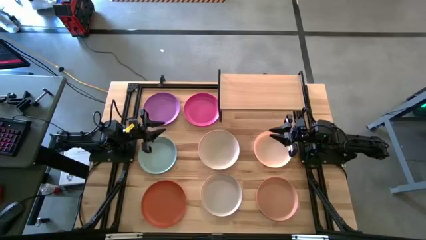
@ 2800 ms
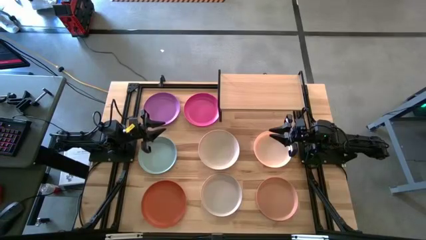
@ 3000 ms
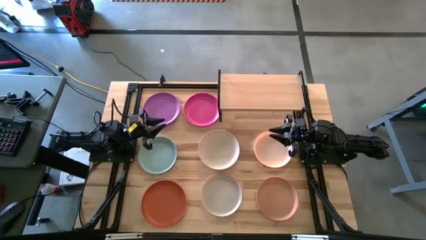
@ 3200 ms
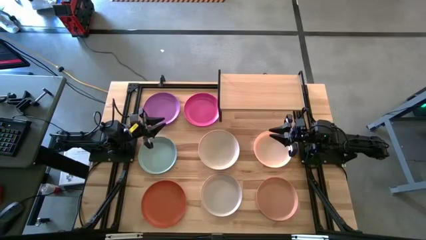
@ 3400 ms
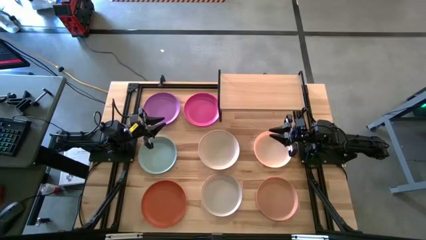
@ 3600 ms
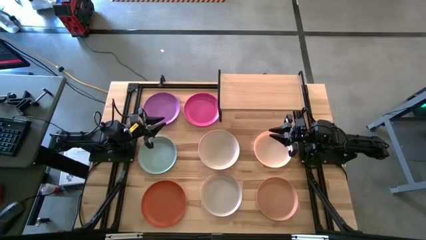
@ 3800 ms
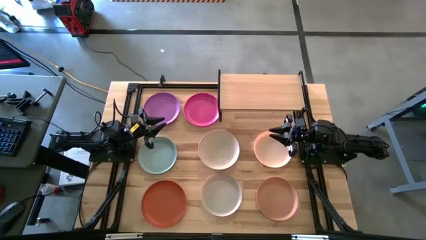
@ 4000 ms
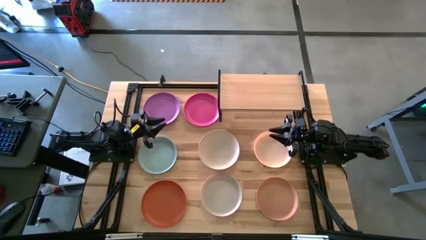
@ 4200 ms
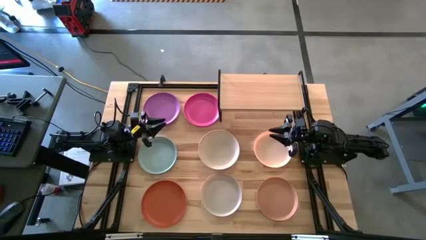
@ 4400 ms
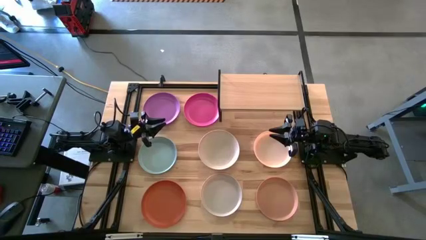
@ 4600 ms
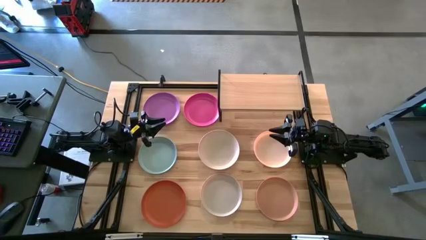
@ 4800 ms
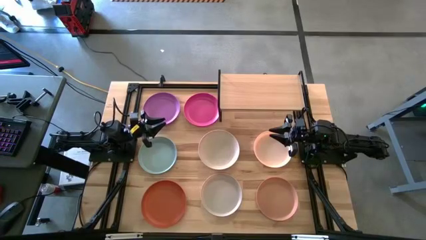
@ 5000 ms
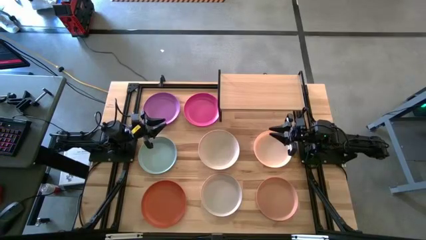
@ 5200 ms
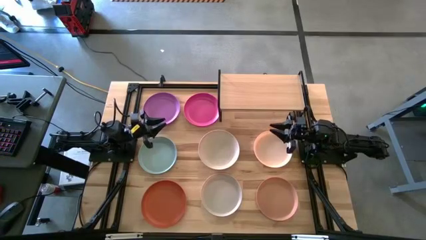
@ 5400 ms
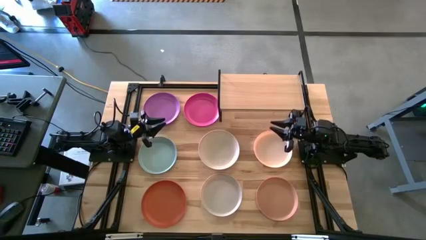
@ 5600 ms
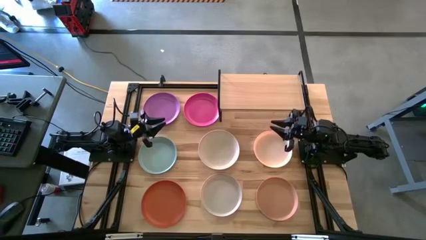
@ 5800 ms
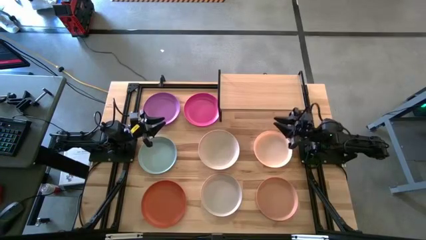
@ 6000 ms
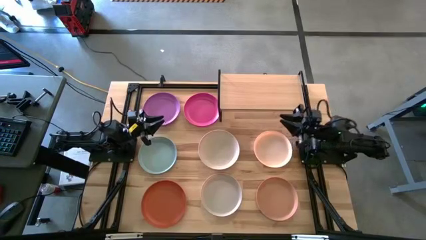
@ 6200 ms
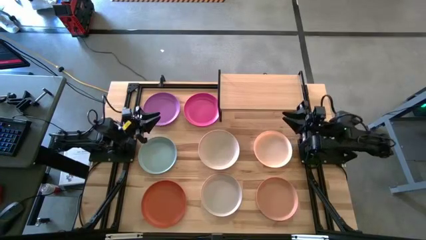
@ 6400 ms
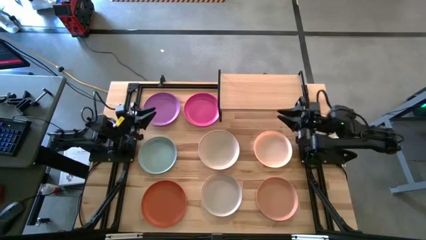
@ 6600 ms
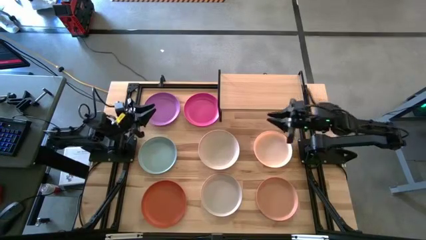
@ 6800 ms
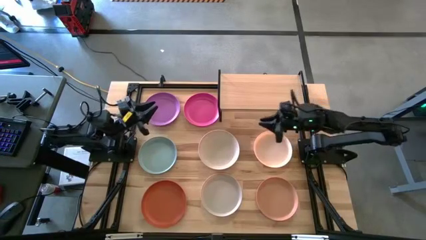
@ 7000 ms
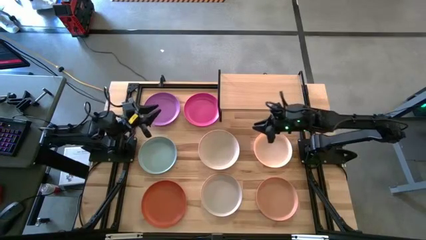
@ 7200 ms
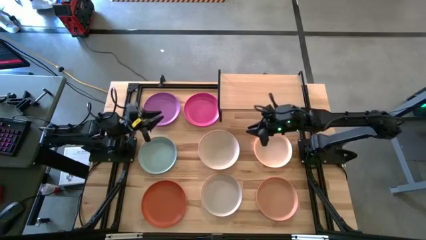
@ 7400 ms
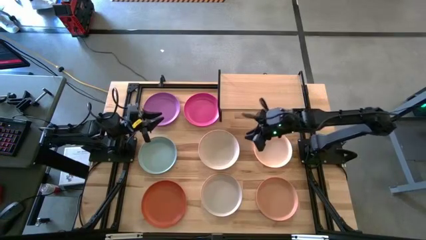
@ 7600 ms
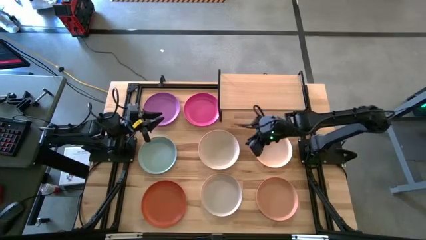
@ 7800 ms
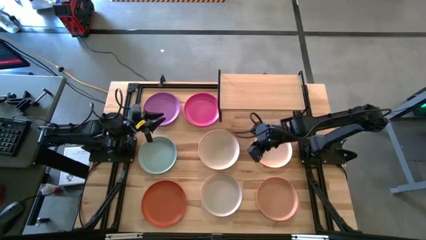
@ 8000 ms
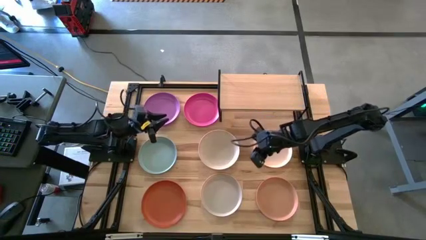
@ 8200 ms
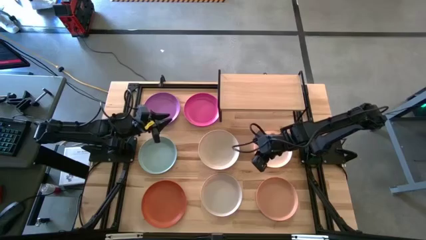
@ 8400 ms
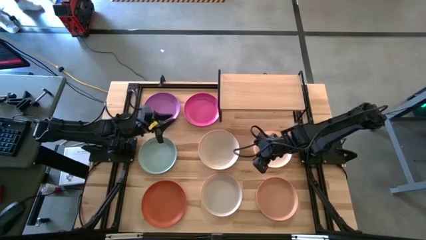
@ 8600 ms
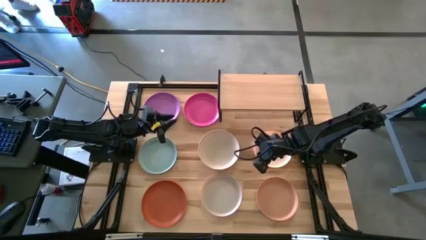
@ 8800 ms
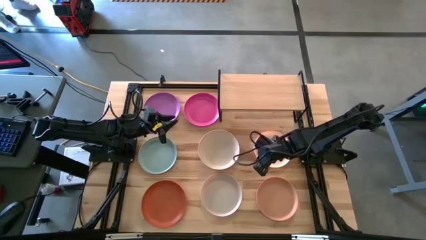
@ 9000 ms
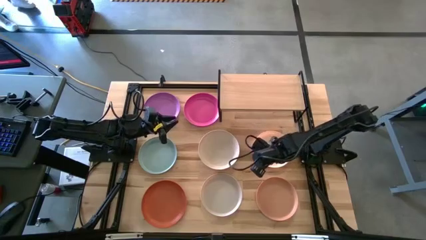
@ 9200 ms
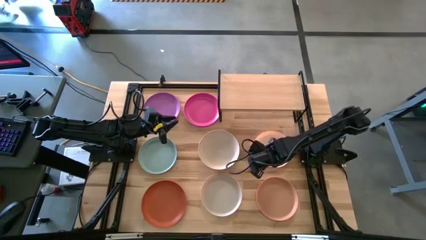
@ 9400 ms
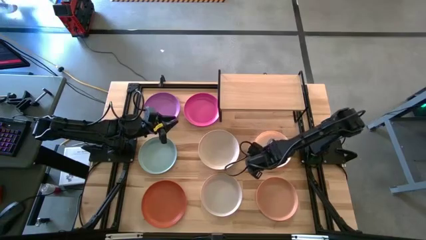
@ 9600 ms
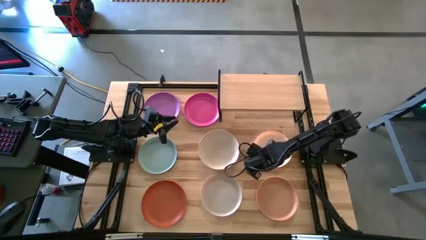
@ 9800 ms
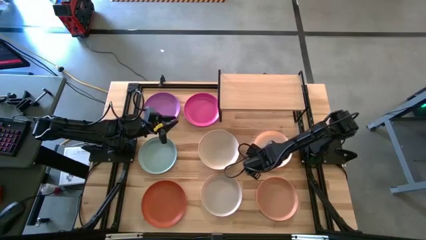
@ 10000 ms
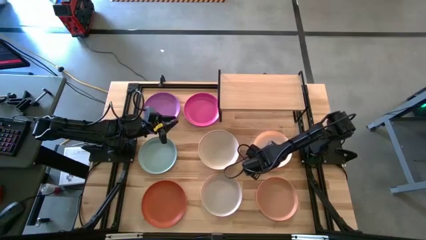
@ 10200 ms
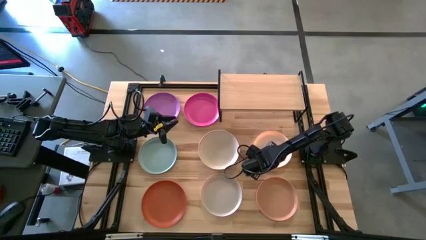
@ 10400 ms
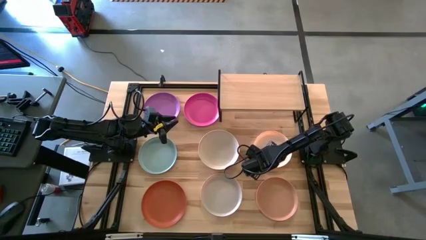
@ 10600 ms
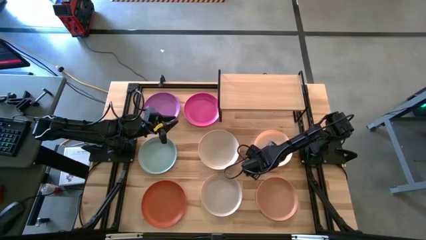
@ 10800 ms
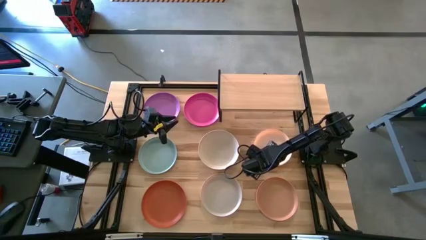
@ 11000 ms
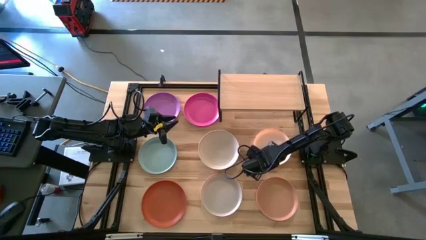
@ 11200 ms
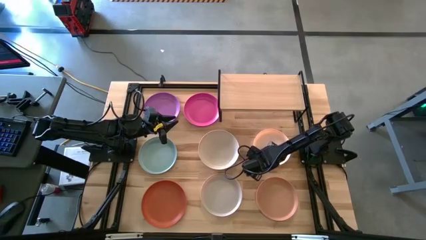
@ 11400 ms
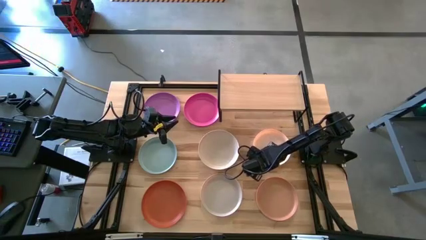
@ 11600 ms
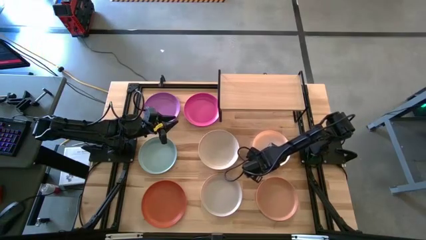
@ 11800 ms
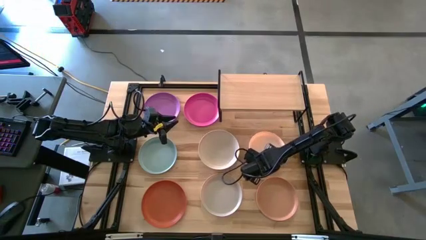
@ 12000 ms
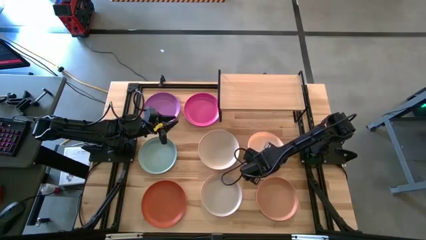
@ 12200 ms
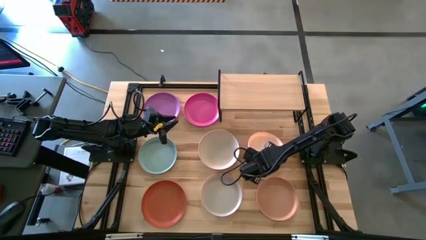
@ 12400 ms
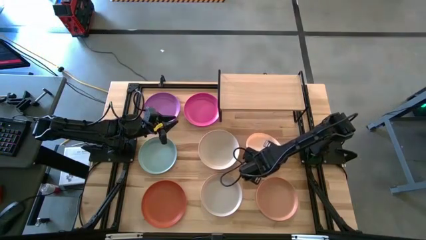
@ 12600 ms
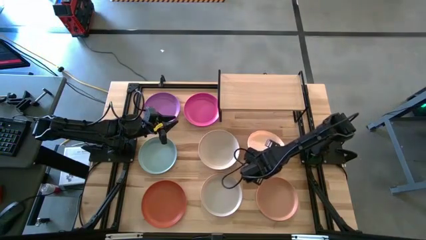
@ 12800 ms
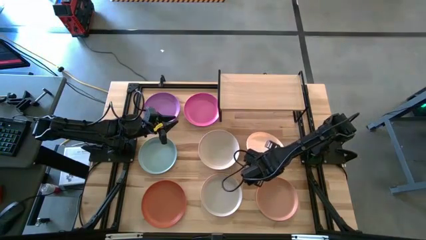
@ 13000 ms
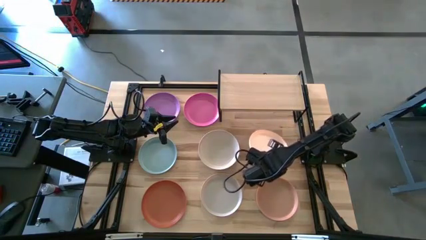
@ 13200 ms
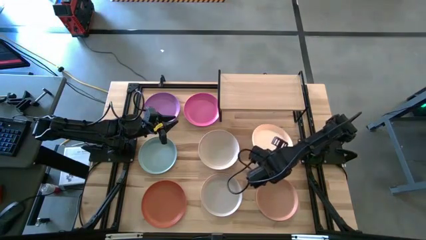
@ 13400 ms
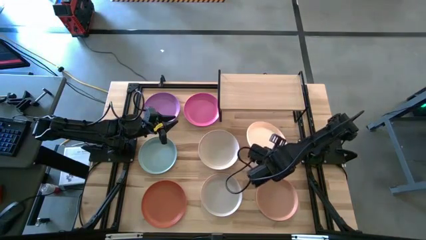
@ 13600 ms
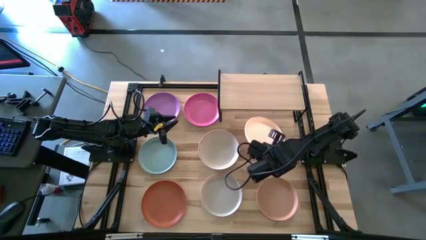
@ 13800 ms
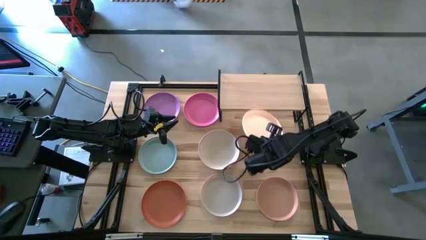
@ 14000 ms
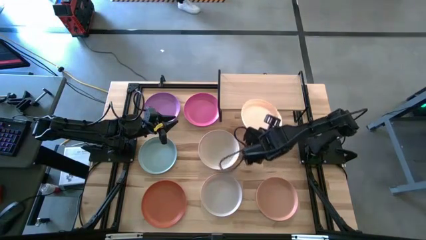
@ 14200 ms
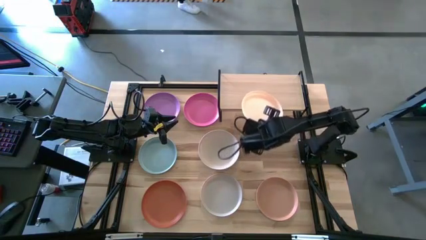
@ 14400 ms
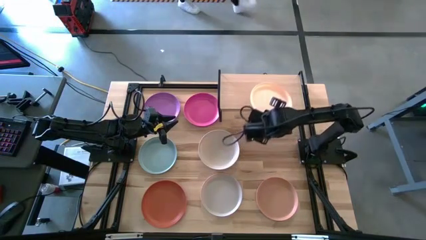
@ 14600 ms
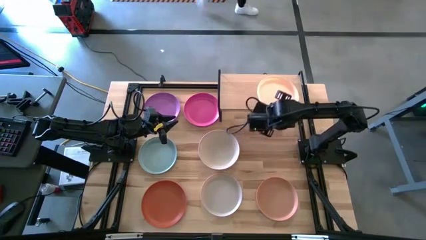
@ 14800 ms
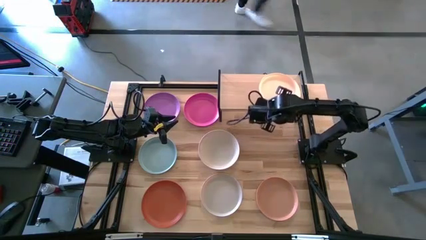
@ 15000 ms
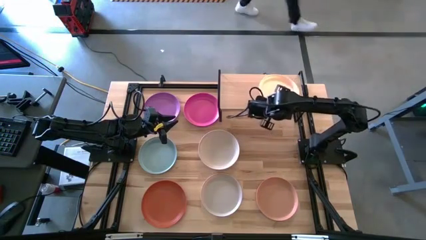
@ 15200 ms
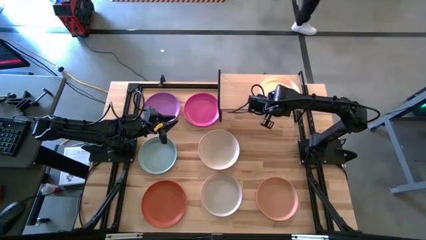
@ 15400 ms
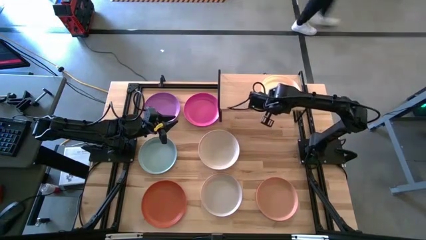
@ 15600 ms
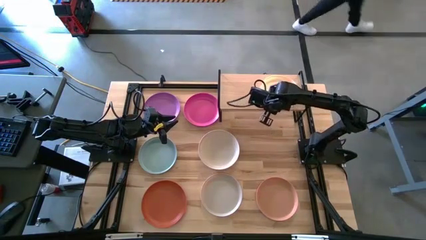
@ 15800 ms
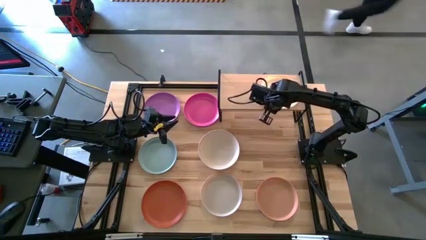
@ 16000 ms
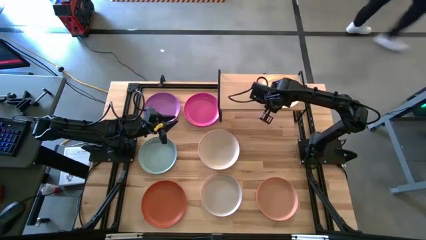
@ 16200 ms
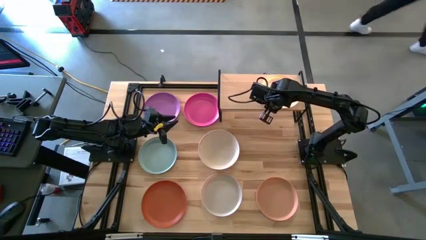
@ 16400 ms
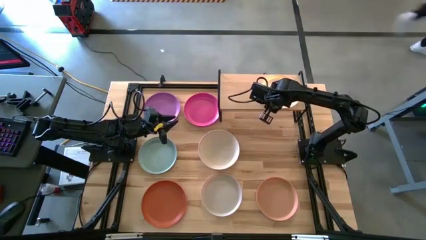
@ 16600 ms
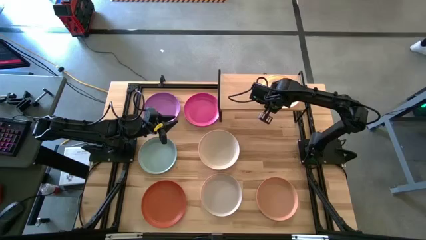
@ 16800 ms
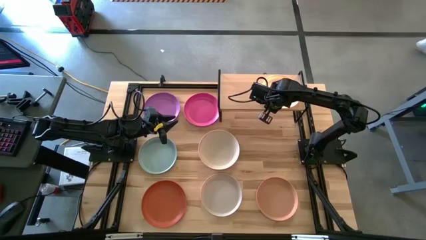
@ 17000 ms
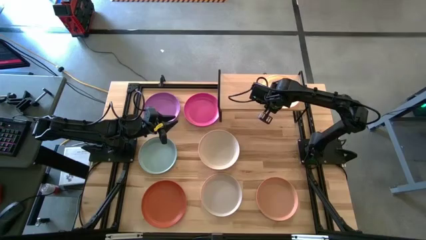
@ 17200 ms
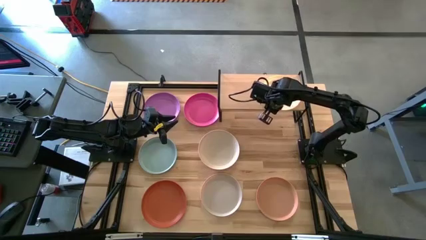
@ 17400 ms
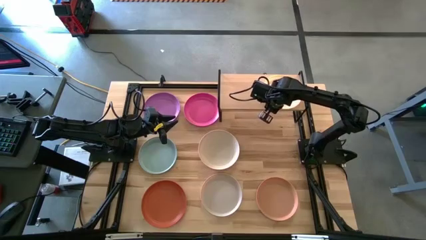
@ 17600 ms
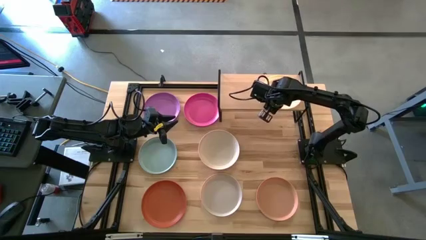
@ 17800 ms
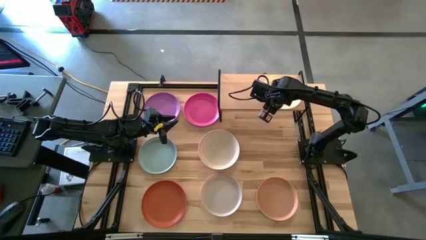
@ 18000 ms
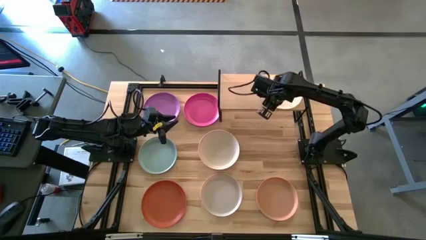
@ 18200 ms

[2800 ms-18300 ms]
Task: Place and stack plates onto a shelf
Put the top right brown plate into the shelf
